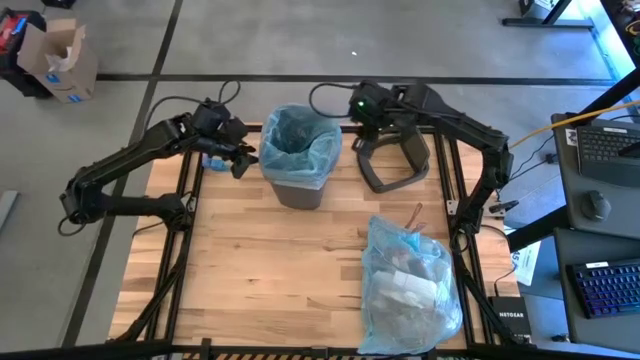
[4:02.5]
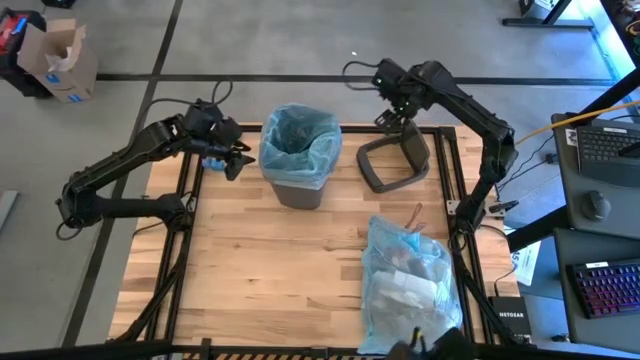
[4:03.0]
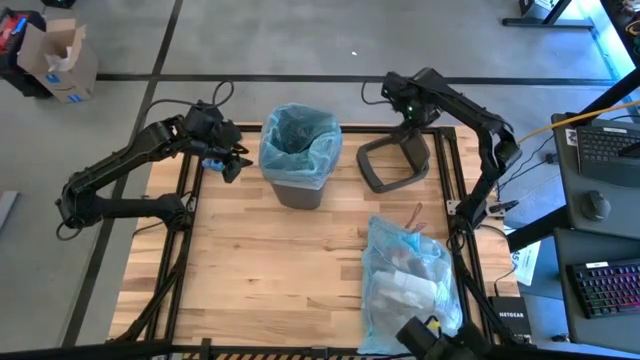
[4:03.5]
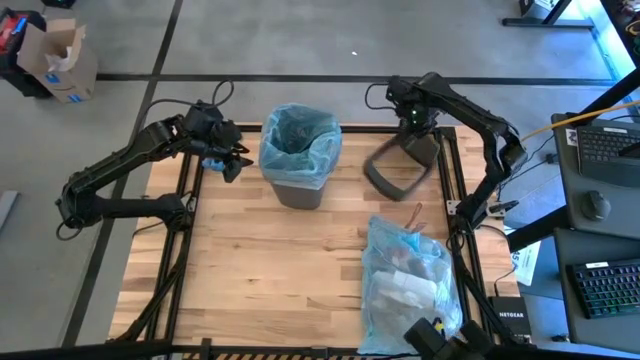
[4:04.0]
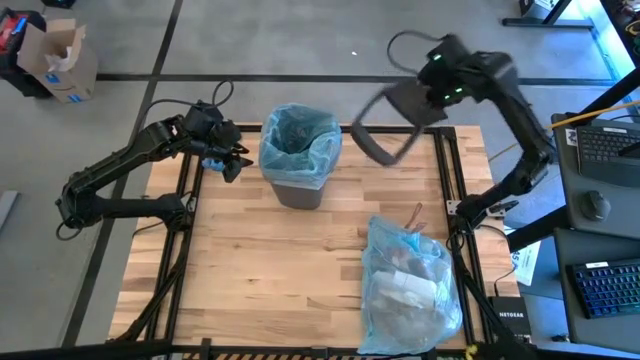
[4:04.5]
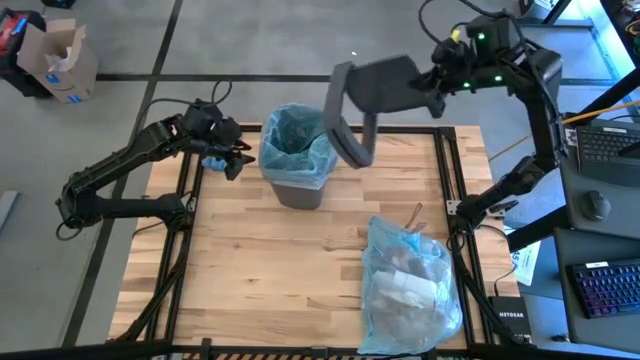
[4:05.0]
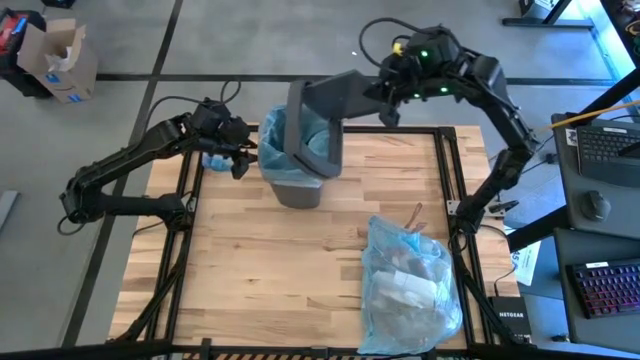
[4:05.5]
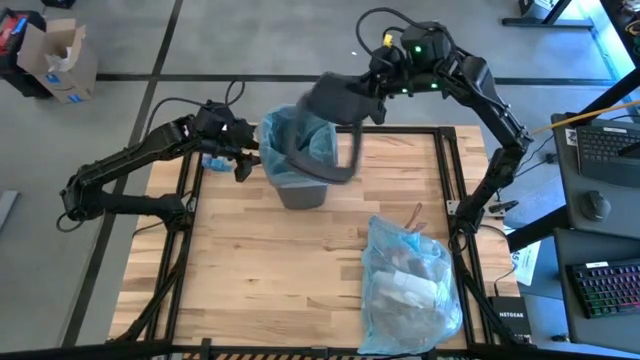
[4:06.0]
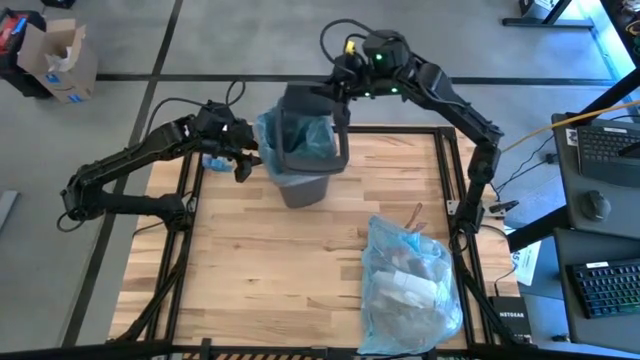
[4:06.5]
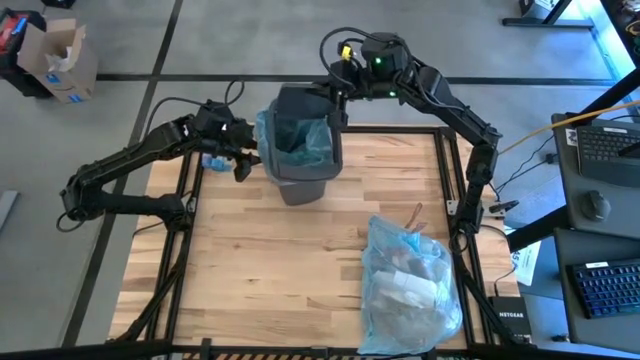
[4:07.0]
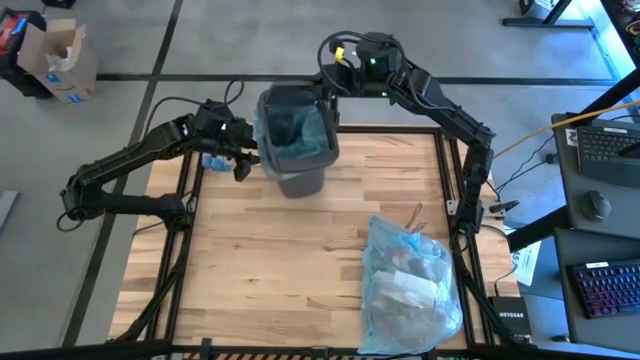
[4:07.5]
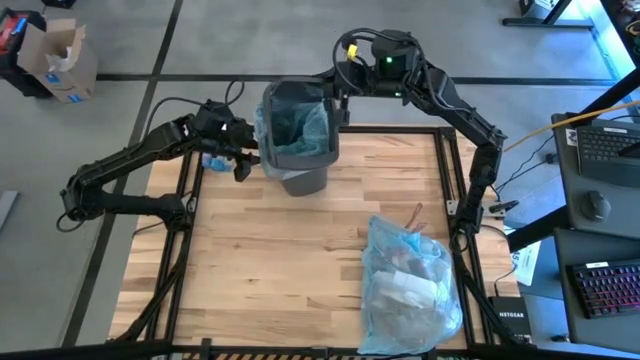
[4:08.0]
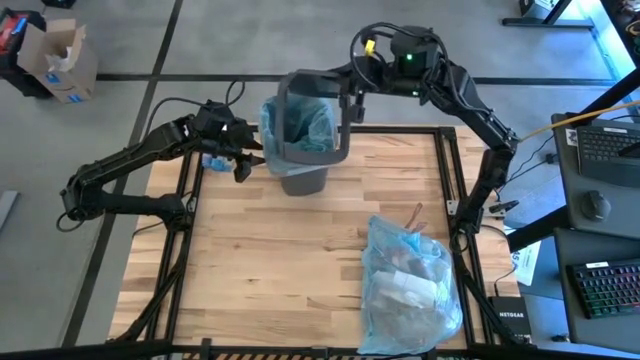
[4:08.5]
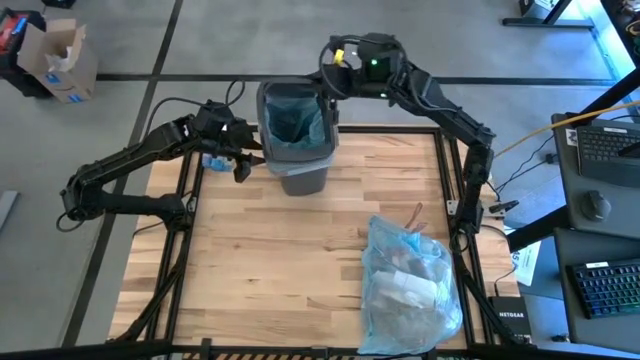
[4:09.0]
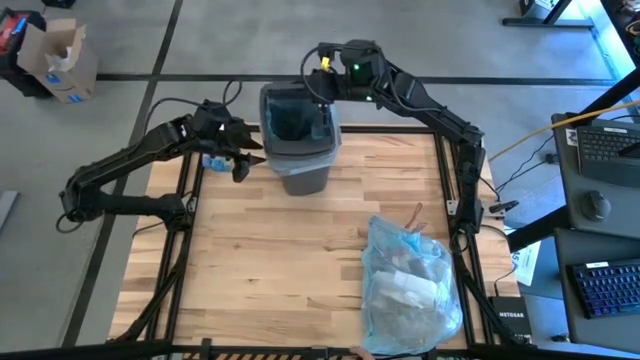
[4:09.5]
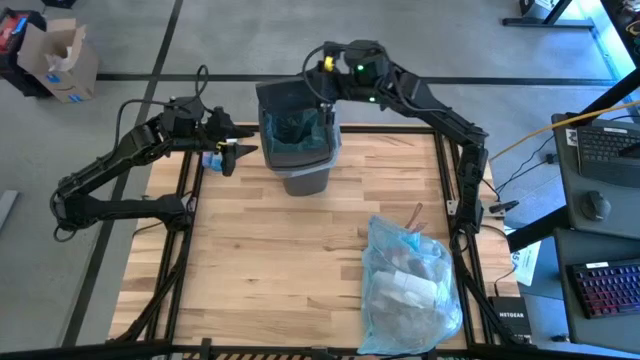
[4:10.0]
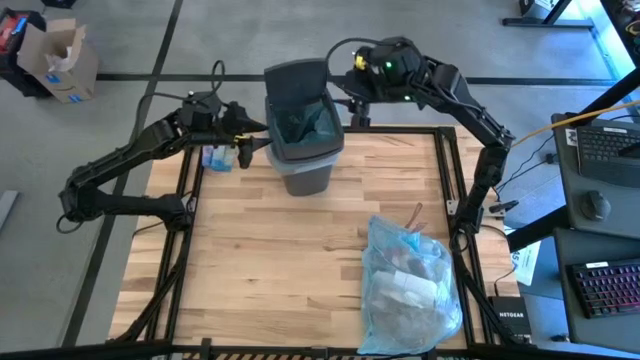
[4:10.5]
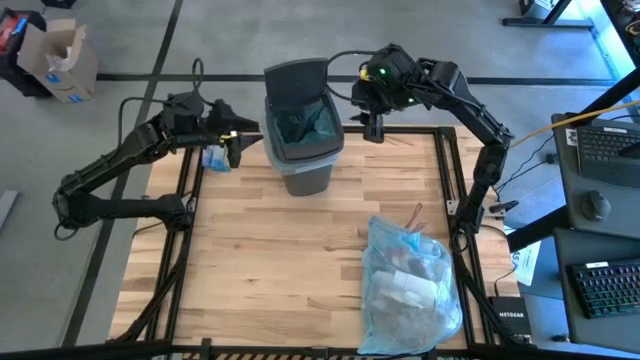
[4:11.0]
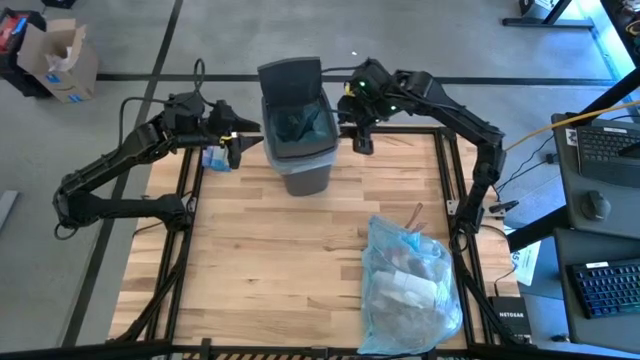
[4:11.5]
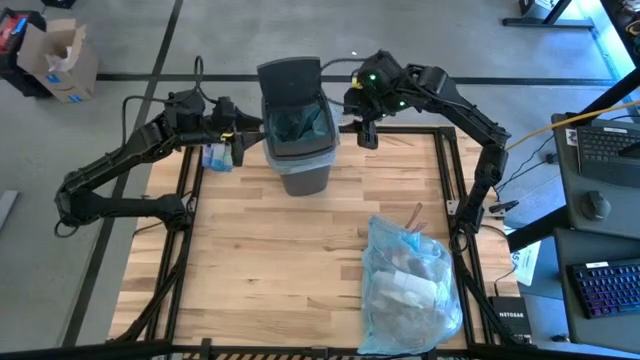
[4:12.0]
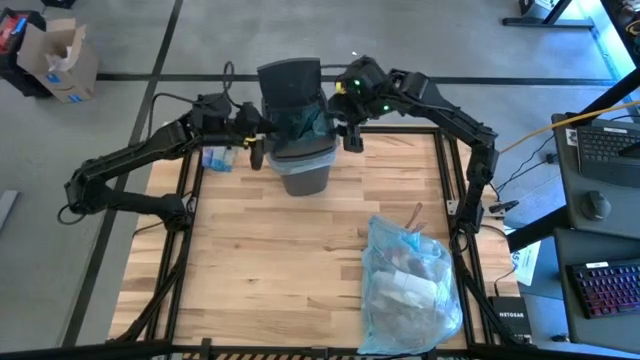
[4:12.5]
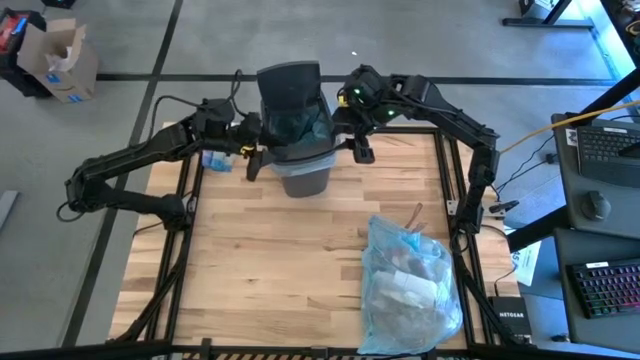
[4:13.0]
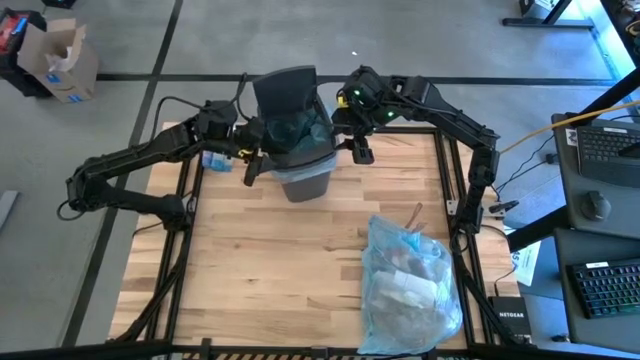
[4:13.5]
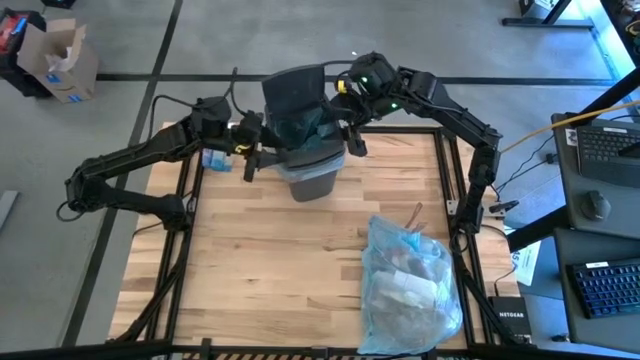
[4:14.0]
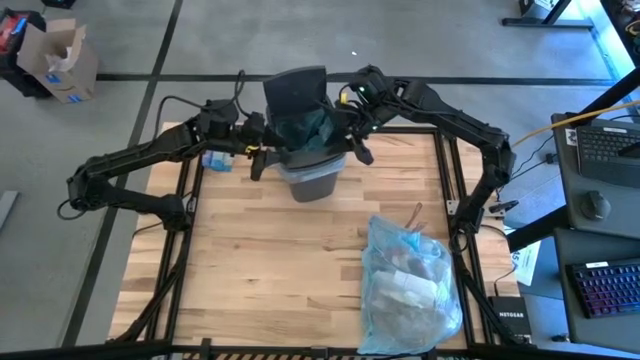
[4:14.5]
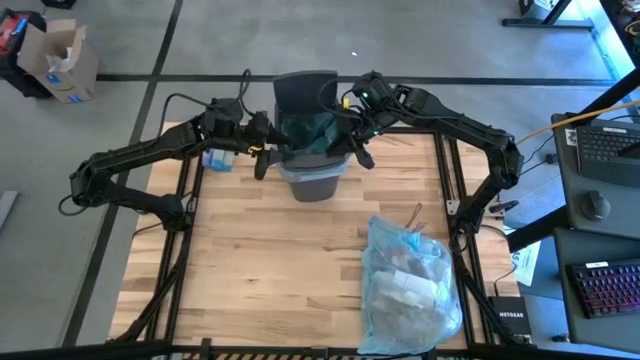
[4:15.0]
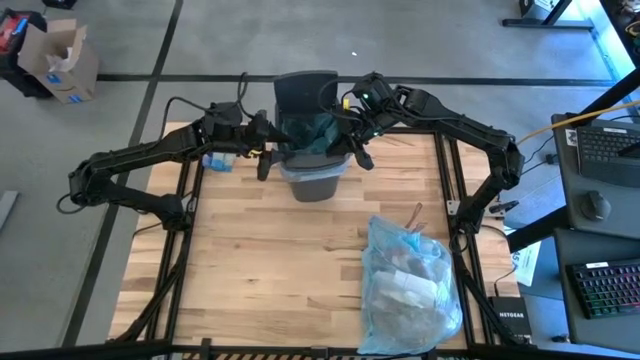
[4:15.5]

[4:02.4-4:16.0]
Task: Pick and place trash into bin
Put the trash cover into the trash bin

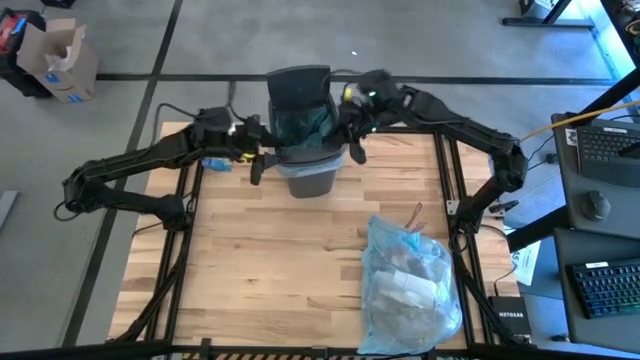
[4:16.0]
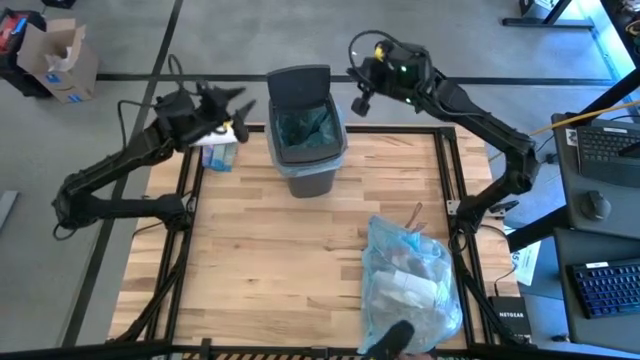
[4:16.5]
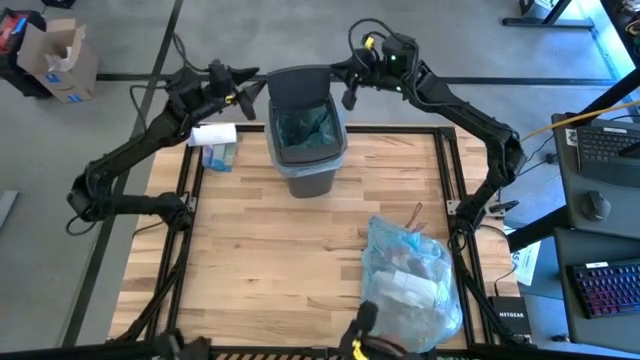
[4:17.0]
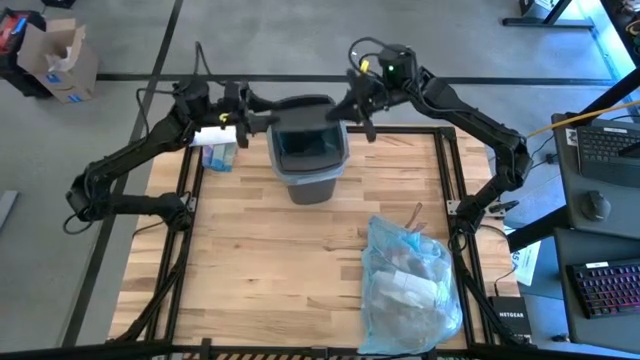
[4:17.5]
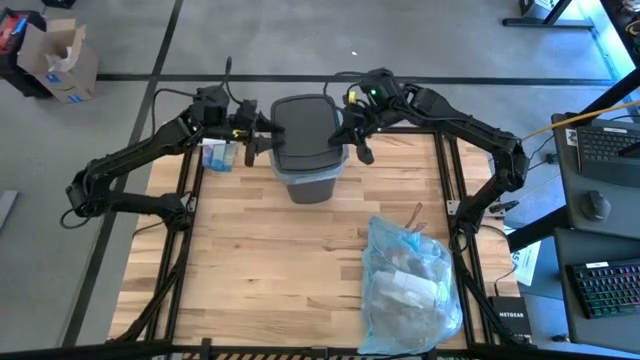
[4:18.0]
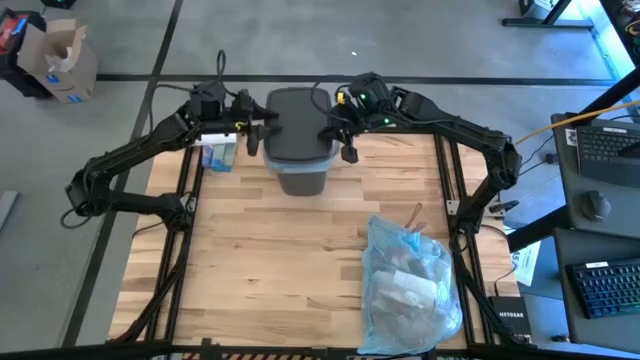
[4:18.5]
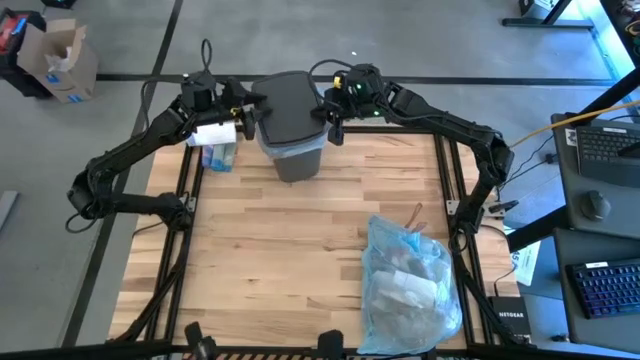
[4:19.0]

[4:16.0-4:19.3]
Close the trash bin

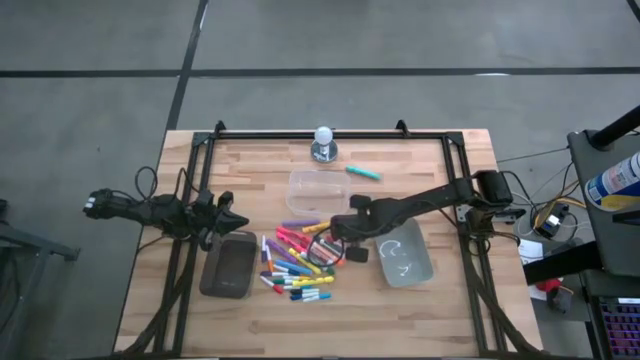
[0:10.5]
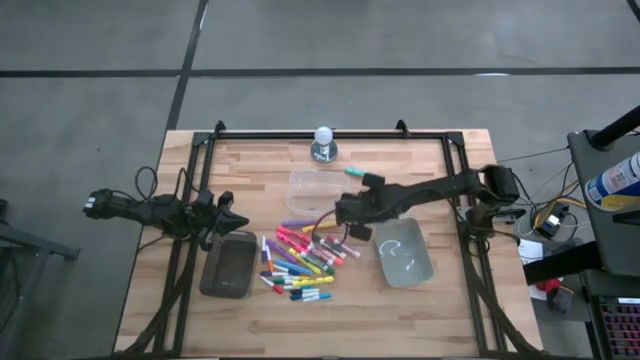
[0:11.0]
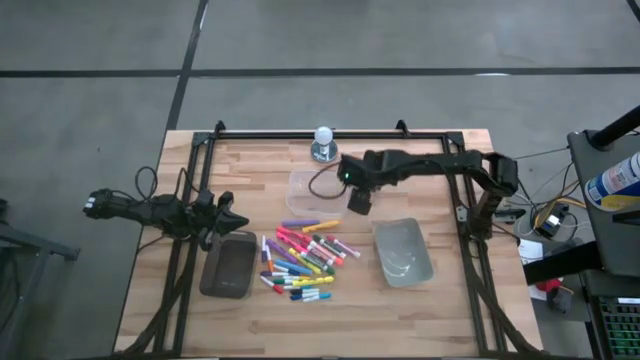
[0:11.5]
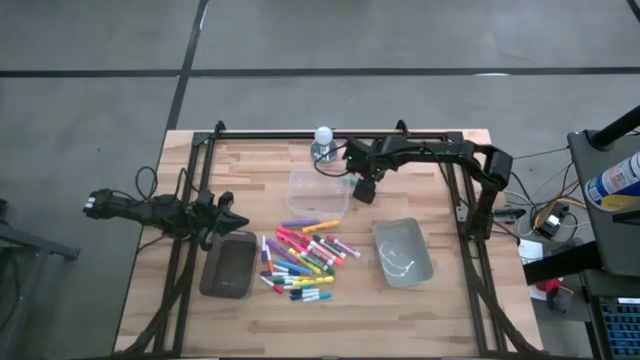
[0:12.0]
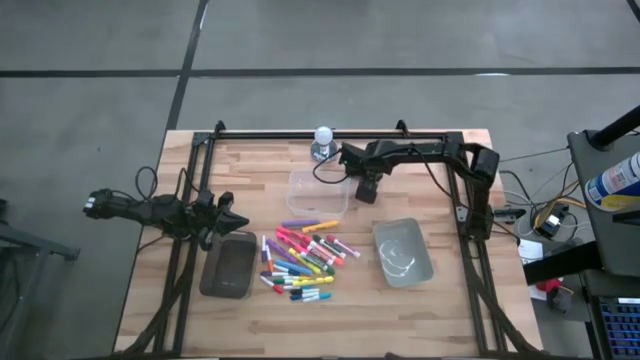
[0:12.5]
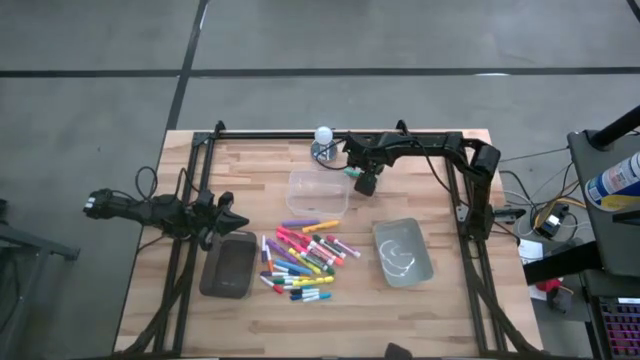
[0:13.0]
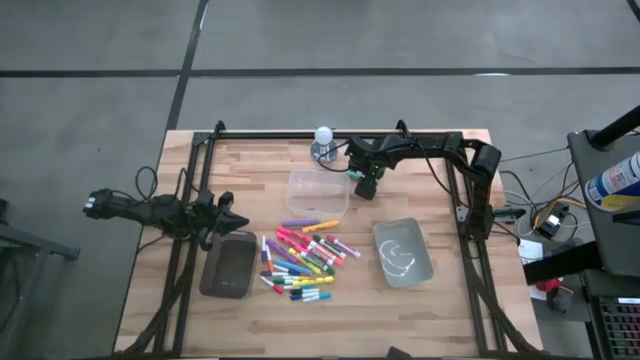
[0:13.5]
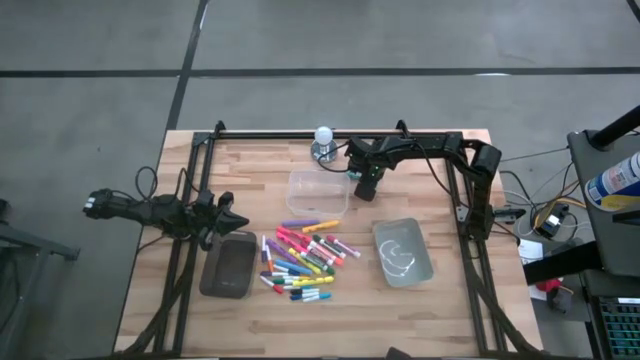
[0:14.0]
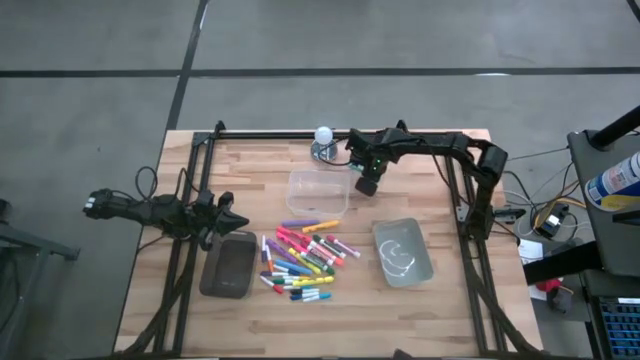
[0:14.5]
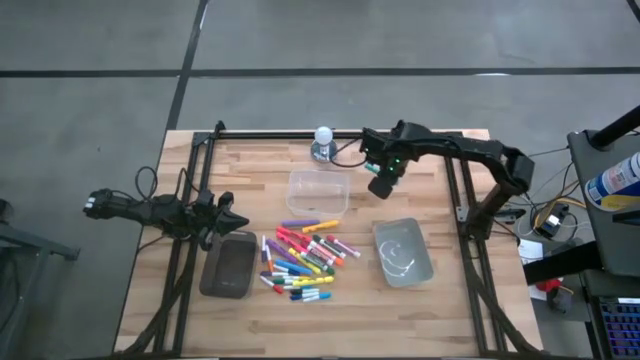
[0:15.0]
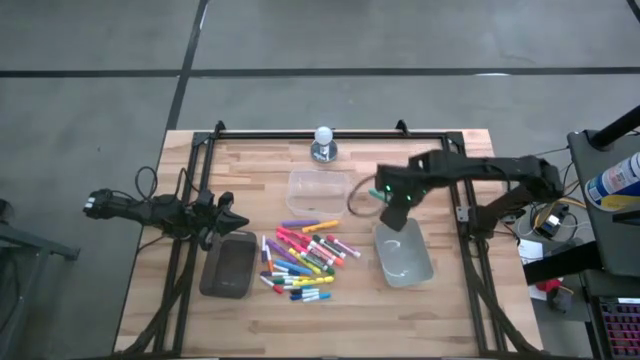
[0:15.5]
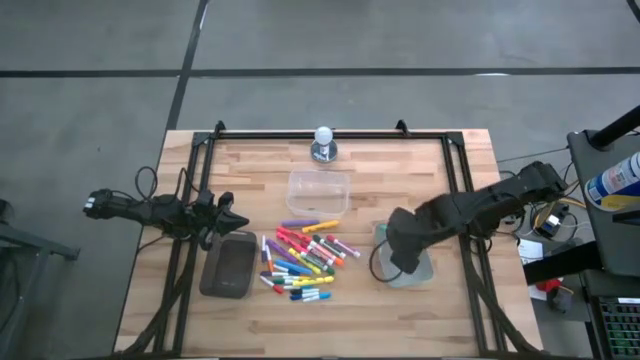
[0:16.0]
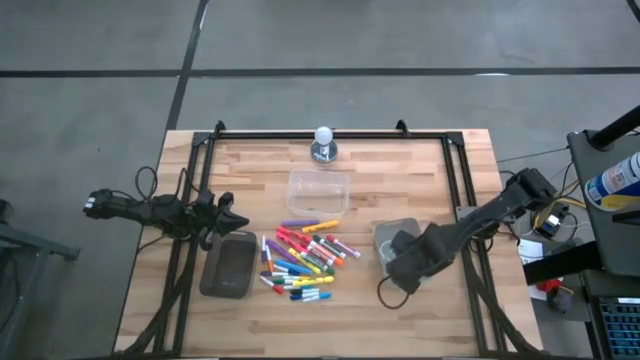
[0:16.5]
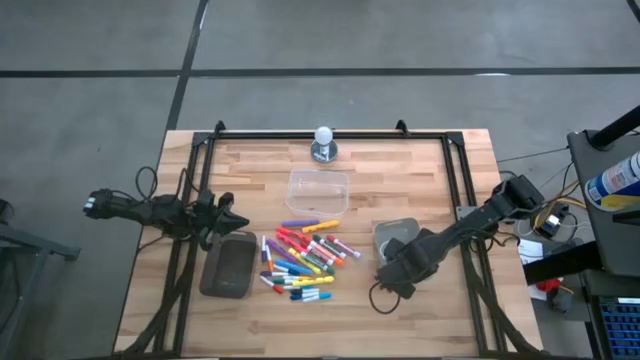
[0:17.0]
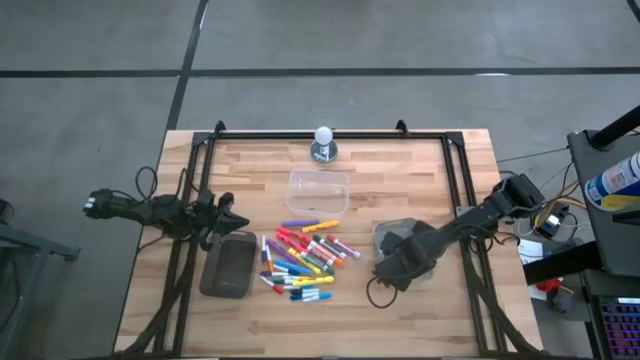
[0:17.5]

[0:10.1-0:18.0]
Task: Pick & Place Markers
Put the light blue highlighter into the gray bin
